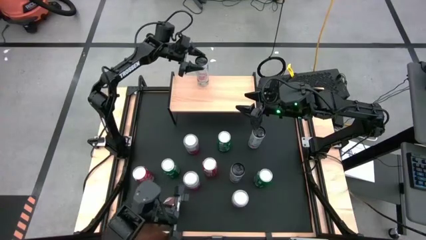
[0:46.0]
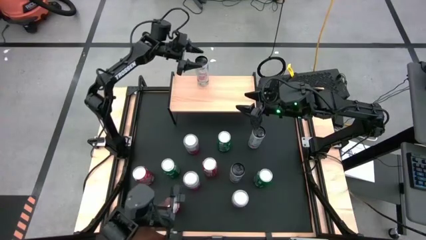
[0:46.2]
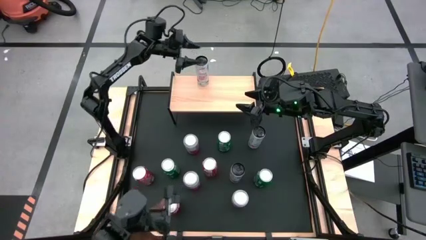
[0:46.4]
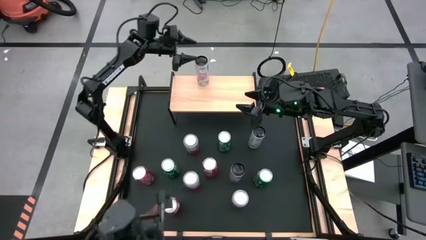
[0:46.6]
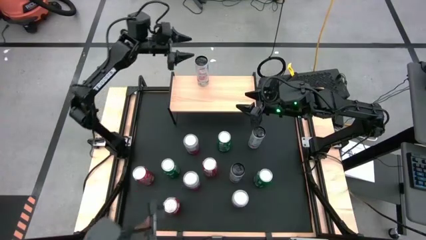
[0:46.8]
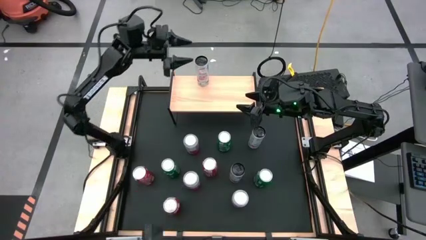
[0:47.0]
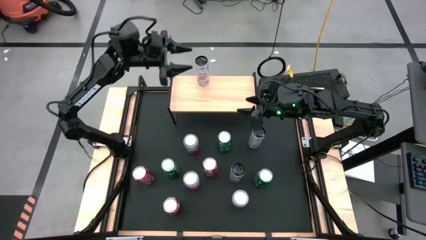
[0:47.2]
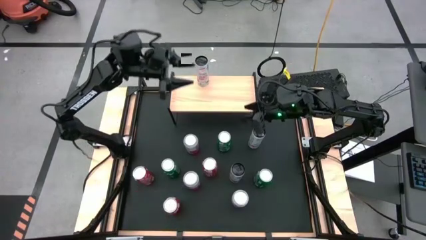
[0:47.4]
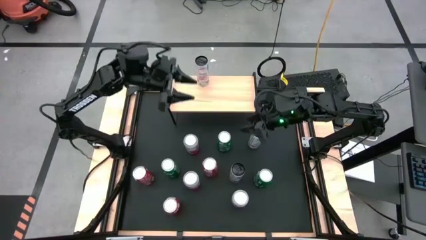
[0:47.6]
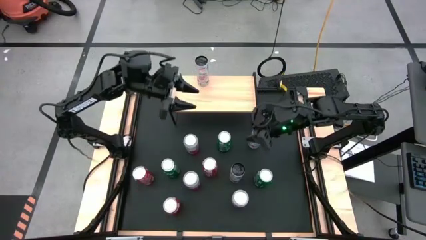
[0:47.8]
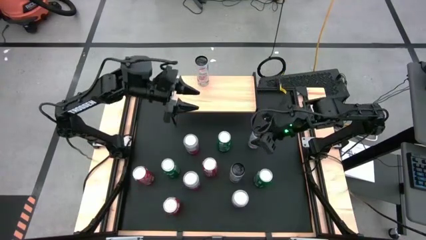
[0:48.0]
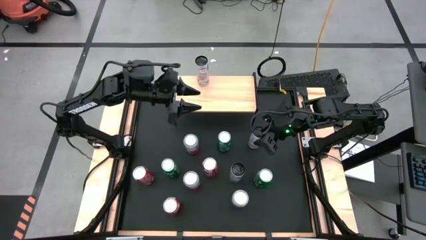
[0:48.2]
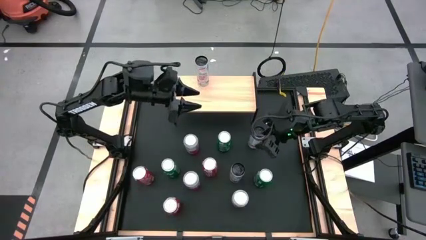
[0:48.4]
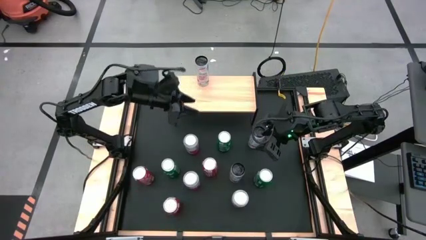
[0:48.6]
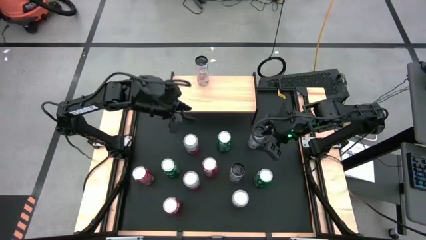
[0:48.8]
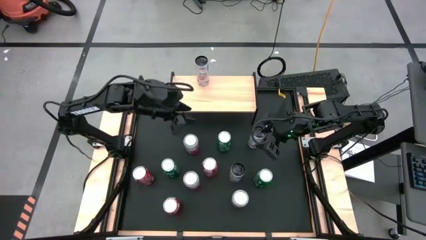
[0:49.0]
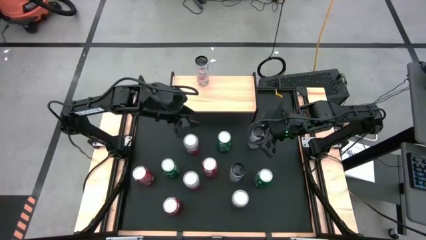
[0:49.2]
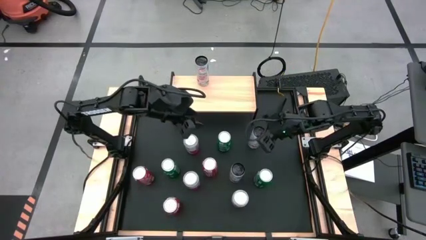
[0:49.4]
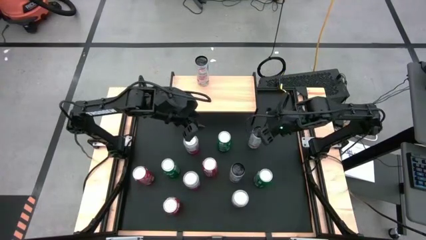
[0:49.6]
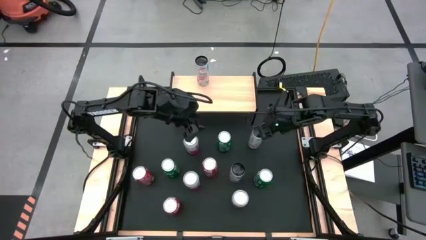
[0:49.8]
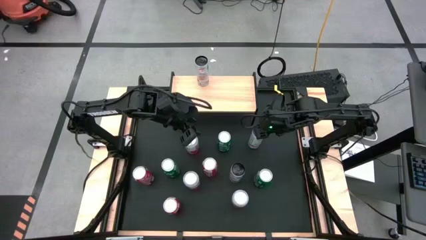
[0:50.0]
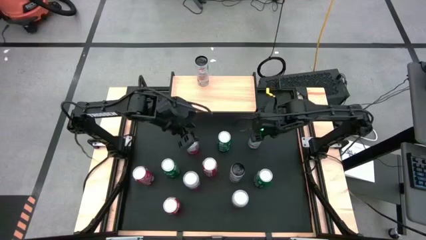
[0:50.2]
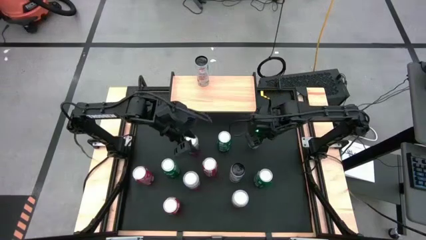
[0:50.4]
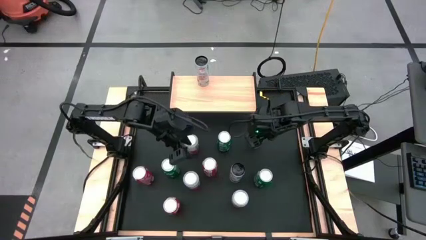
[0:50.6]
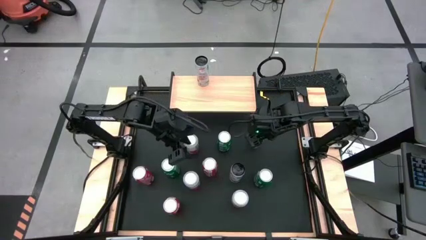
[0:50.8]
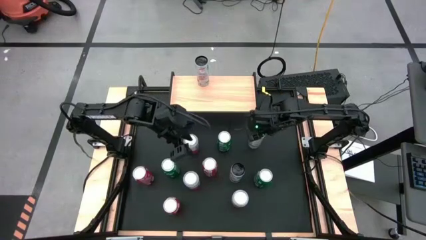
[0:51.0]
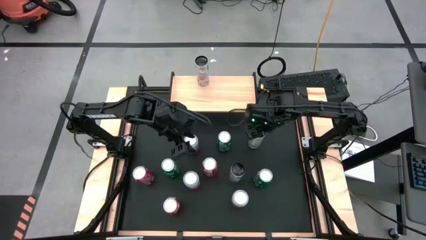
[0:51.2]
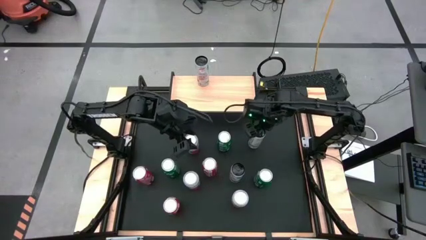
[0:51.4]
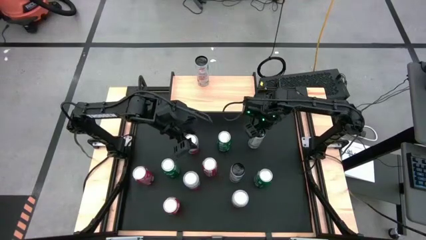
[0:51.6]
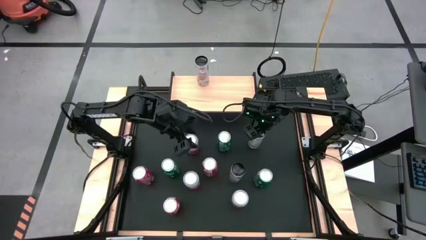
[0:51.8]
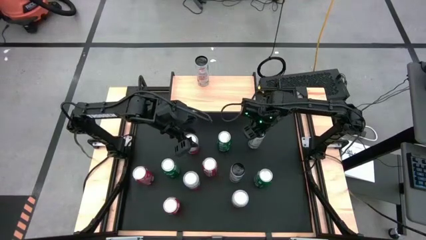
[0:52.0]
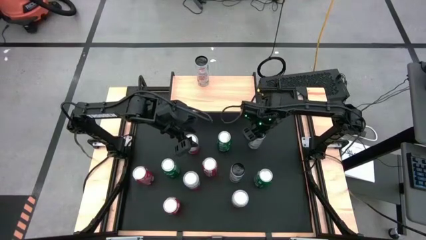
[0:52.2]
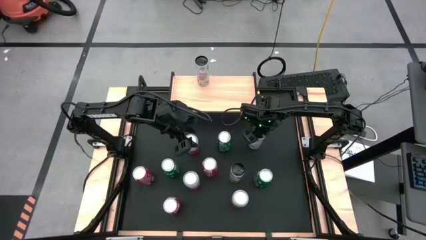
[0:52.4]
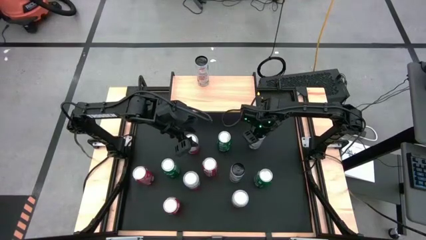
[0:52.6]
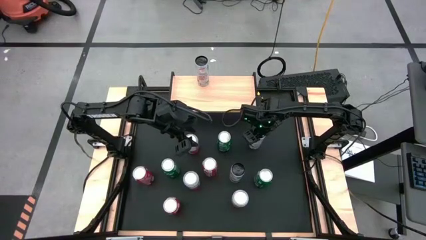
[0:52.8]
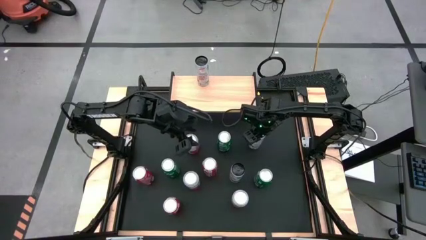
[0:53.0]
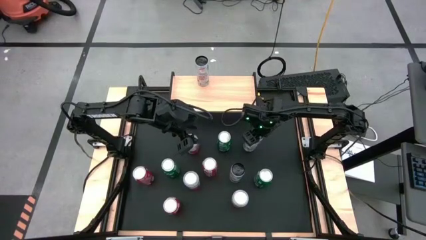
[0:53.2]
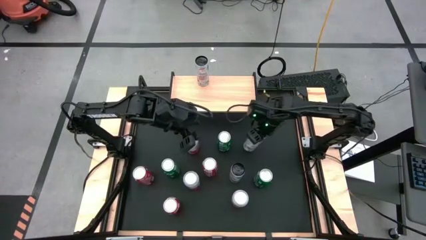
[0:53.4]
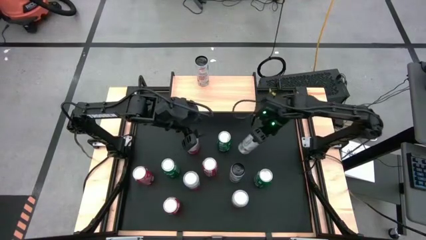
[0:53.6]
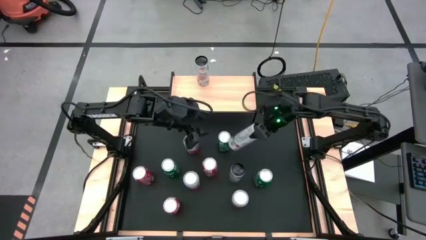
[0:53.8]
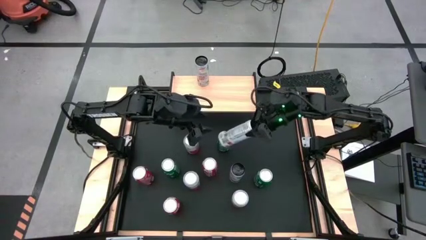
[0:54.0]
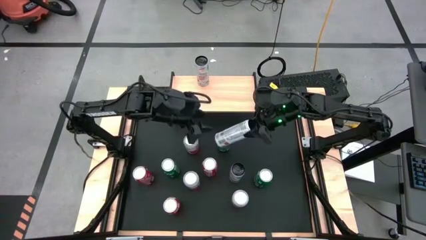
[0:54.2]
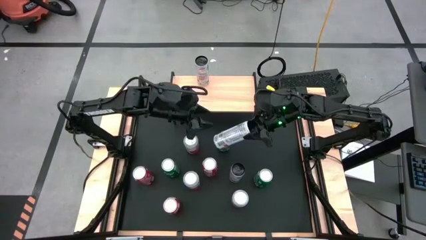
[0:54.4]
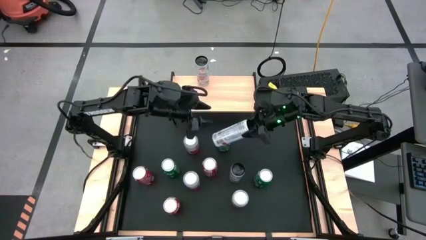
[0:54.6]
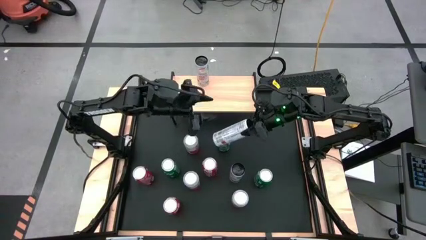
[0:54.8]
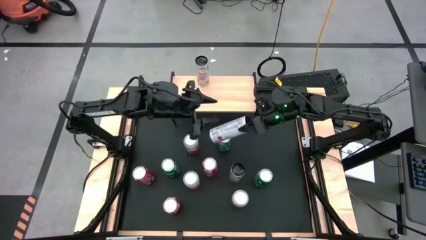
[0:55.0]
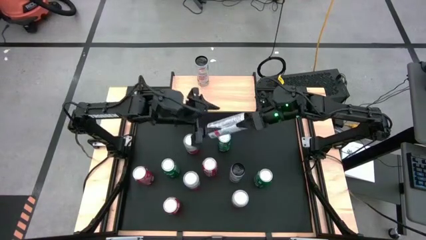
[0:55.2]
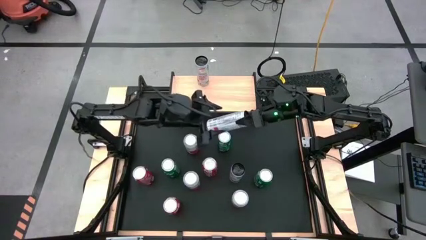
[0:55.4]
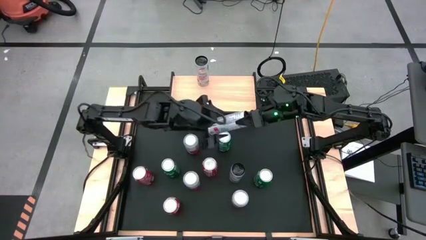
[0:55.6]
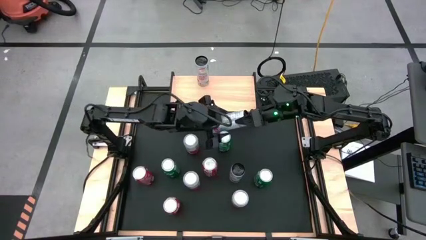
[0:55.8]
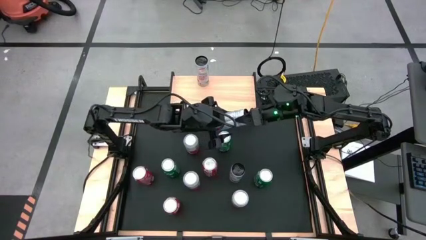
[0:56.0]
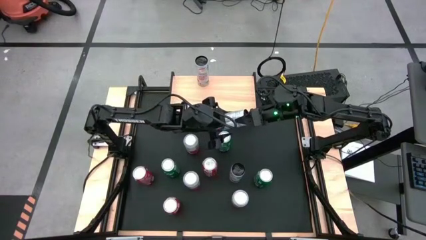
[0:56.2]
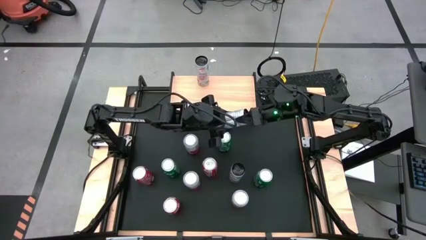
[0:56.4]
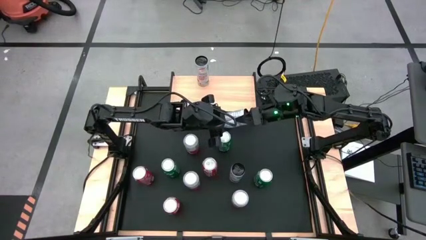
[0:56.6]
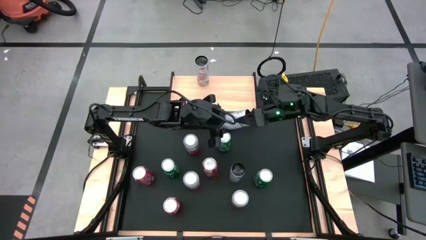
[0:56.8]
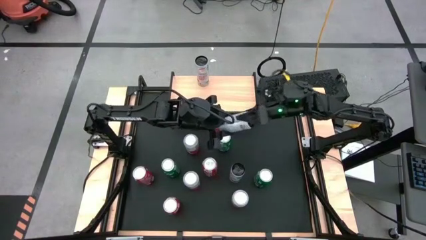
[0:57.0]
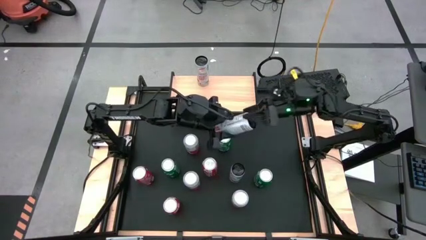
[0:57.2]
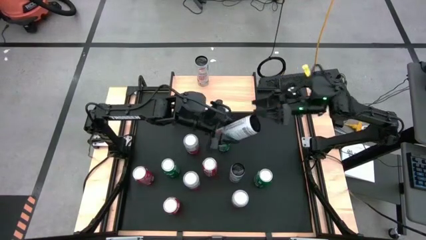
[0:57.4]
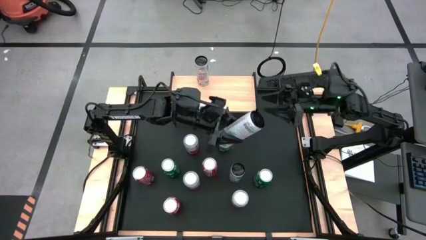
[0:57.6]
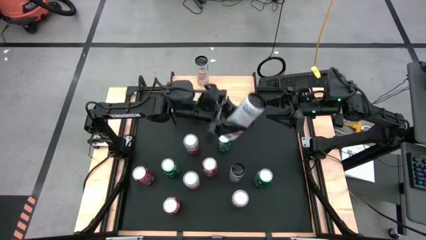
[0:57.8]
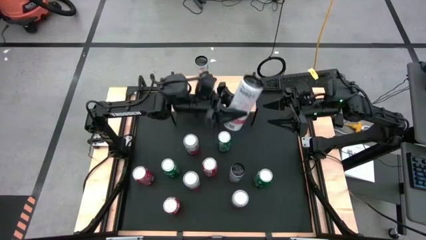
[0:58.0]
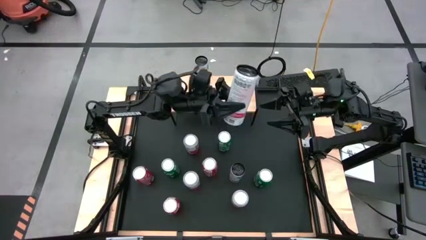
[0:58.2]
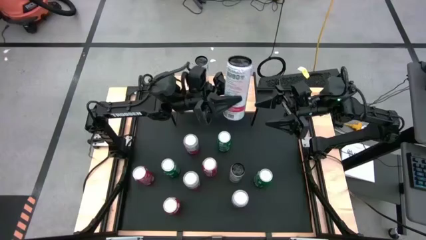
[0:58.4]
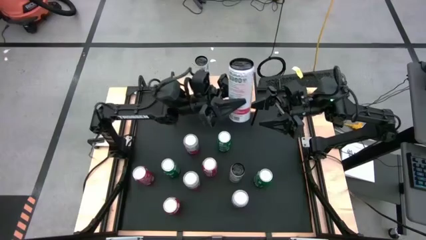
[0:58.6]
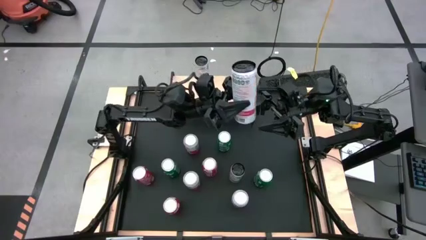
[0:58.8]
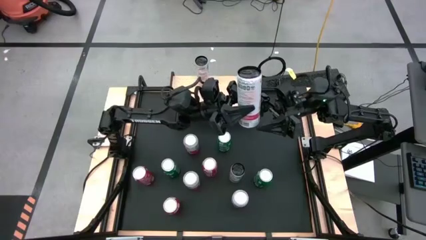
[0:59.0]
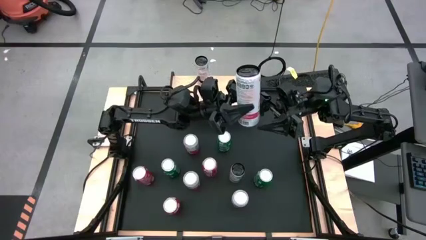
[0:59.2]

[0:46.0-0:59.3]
Task: Place canned beverage on shelf
Put the top white pink soda can aligned with the other white pink soda can on the shelf
